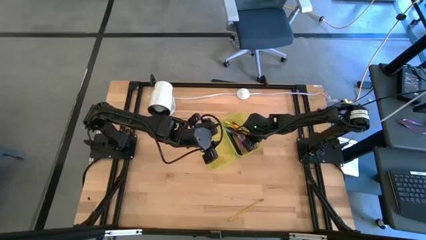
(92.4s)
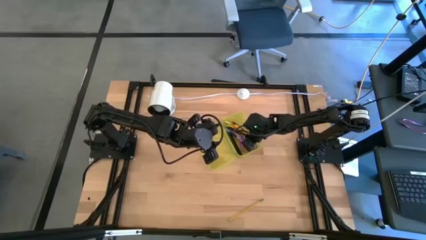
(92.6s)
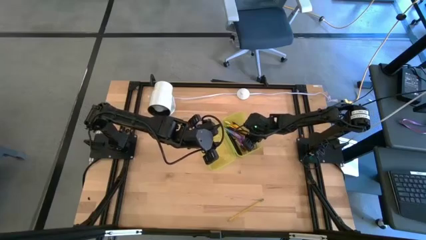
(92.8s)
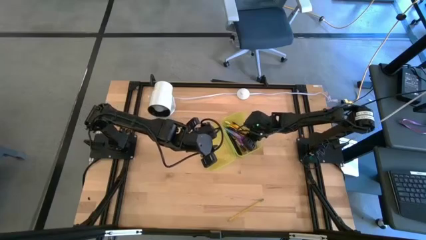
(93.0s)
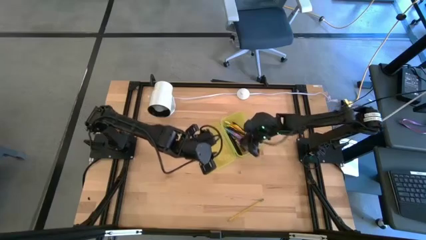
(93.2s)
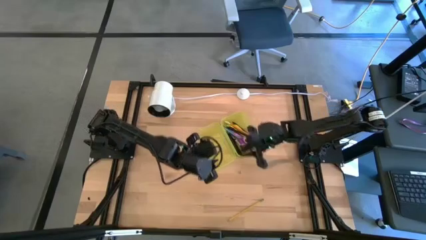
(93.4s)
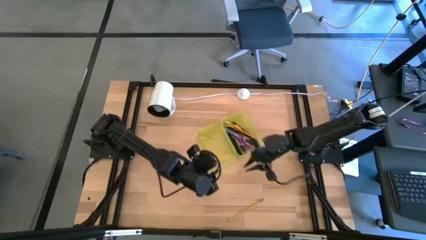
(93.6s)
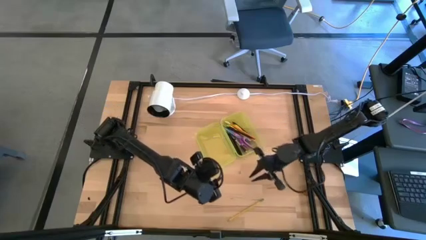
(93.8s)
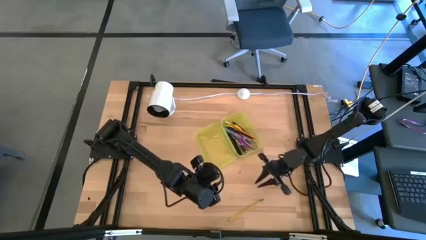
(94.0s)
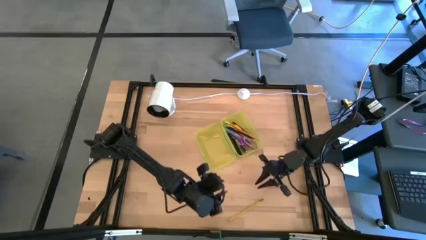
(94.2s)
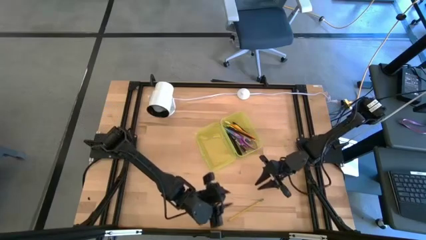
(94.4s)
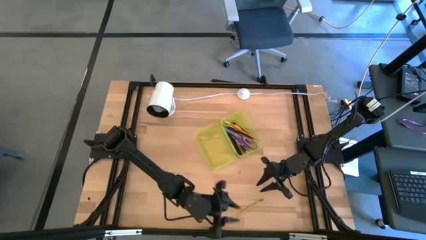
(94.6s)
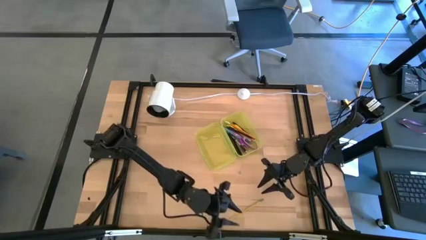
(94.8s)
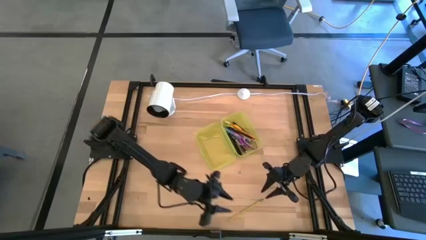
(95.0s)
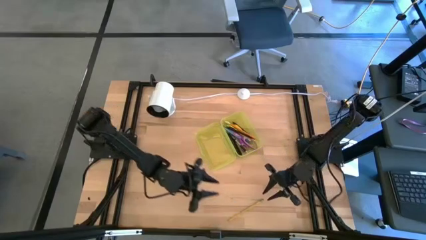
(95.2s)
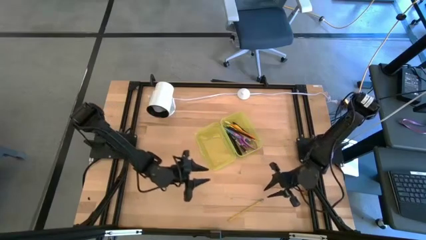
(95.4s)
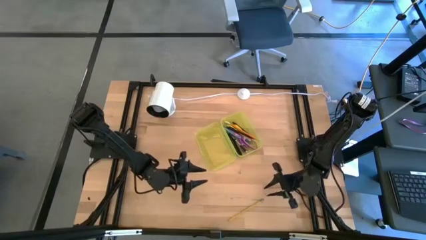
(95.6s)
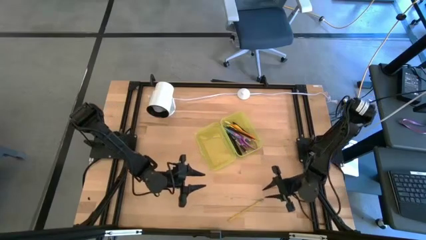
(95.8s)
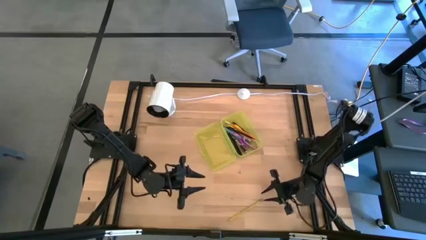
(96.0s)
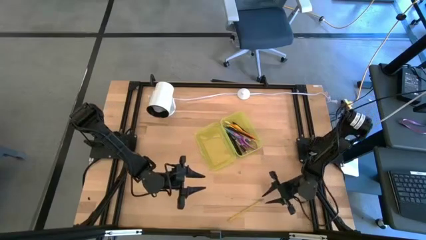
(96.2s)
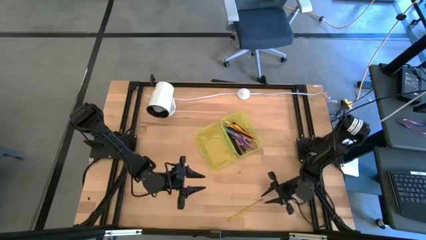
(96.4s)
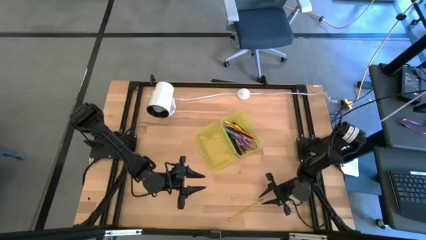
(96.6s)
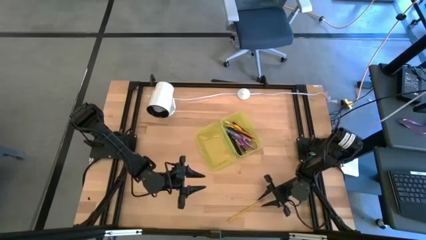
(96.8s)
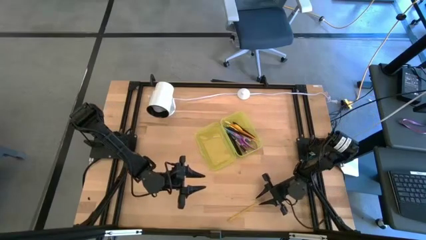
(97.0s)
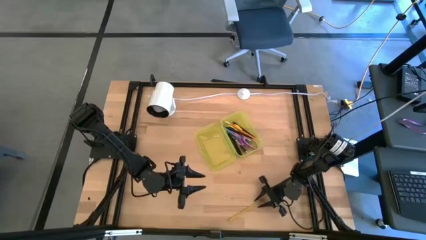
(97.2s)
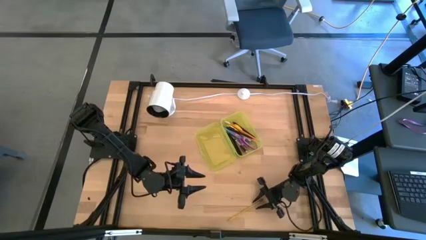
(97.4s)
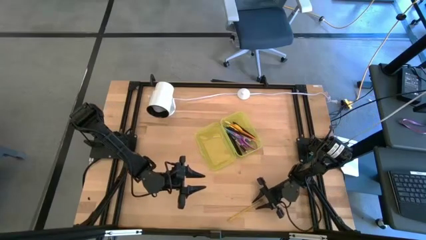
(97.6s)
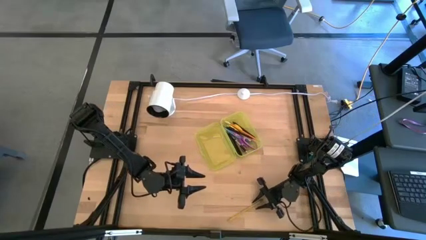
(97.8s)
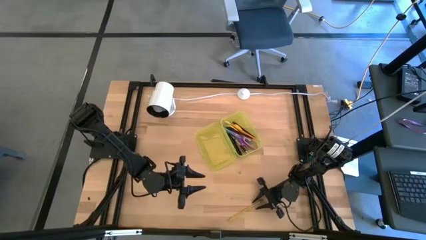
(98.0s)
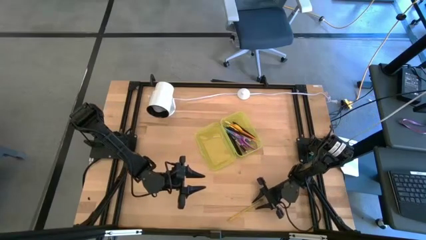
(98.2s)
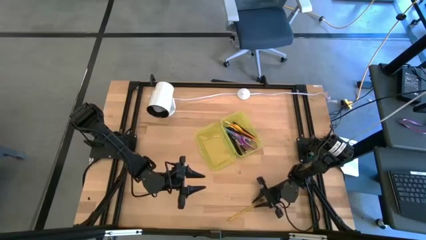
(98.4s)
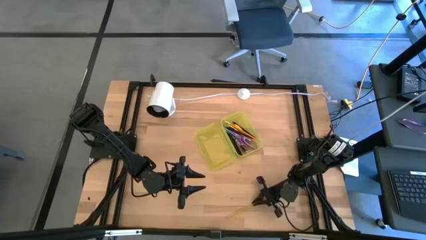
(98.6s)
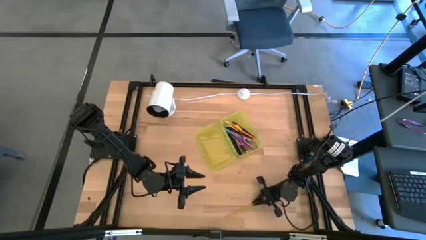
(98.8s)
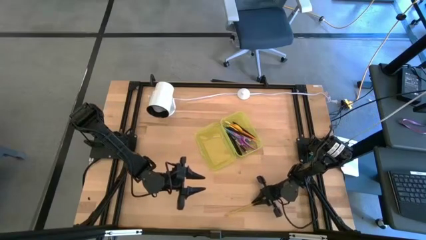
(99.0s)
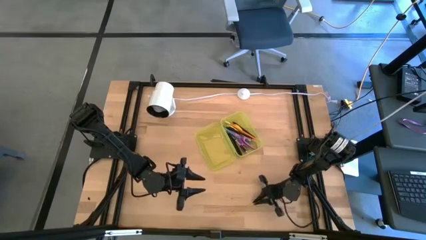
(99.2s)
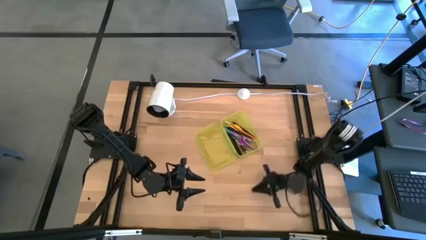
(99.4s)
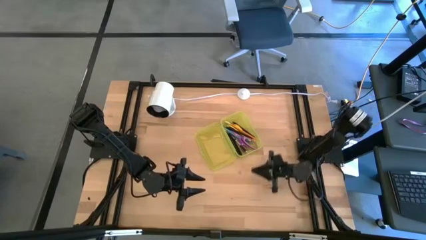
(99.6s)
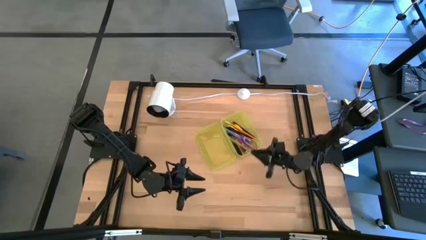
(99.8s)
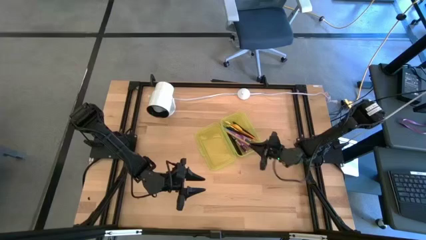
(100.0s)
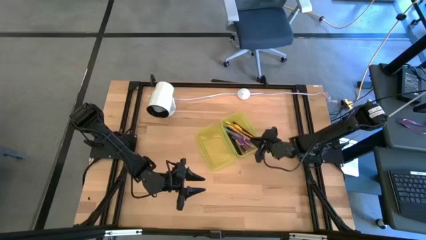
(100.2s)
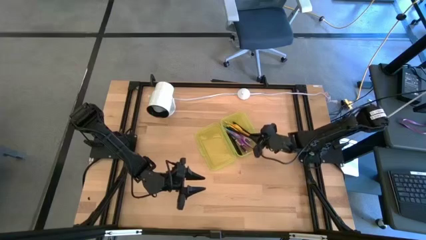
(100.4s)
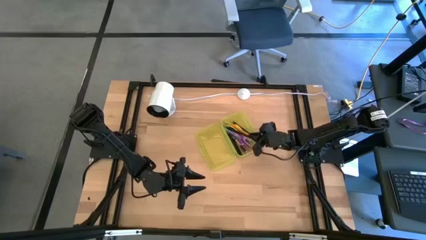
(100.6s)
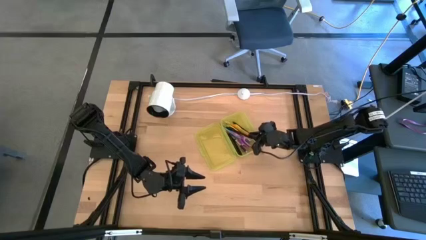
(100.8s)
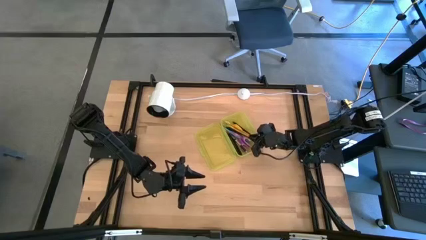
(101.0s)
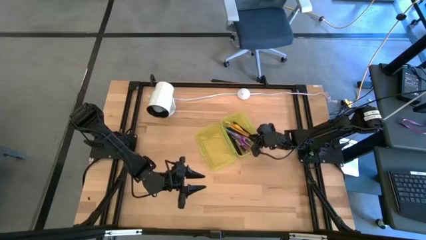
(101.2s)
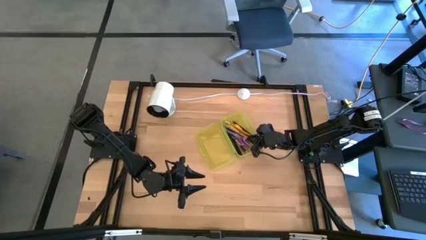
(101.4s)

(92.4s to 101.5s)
Task: Pick & place school supplies into a supply box
Put the orange pencil into the yellow supply box
